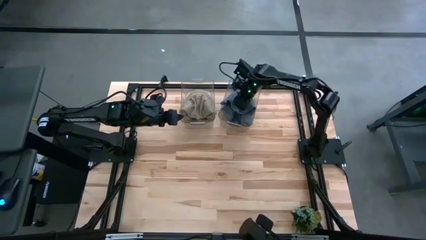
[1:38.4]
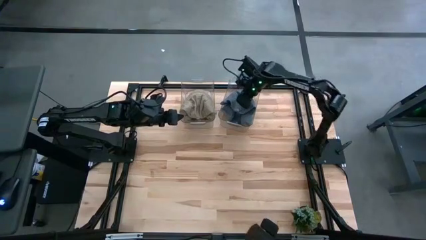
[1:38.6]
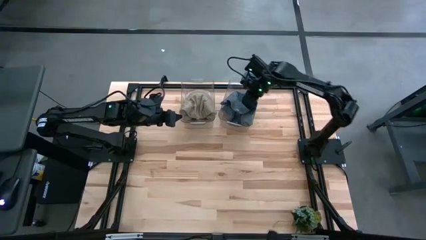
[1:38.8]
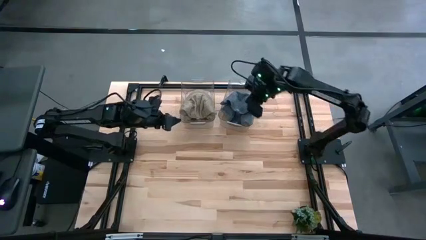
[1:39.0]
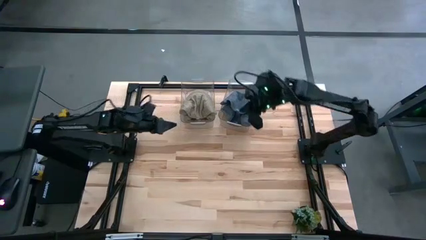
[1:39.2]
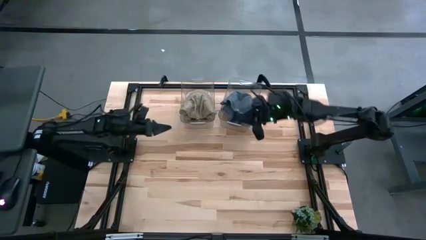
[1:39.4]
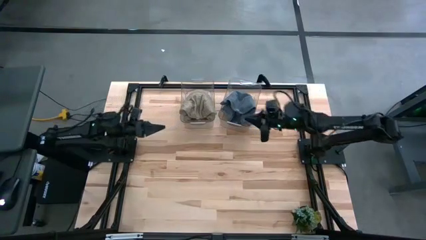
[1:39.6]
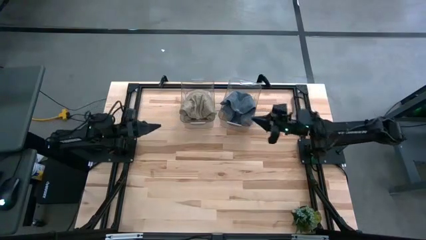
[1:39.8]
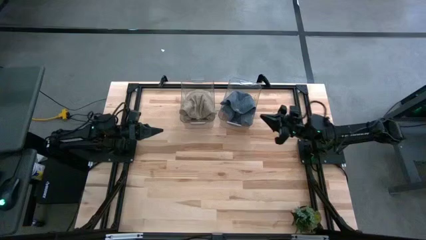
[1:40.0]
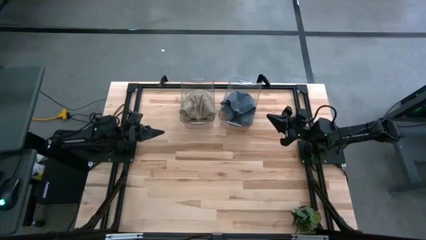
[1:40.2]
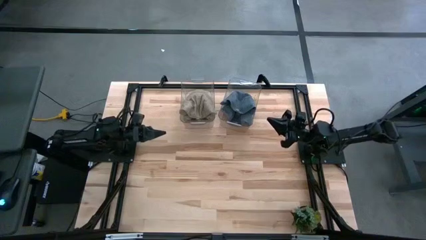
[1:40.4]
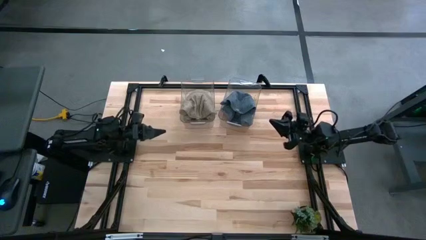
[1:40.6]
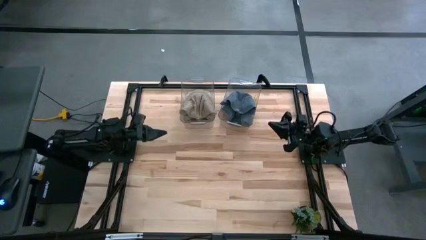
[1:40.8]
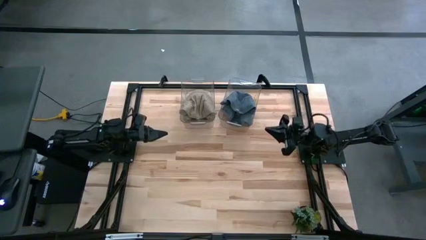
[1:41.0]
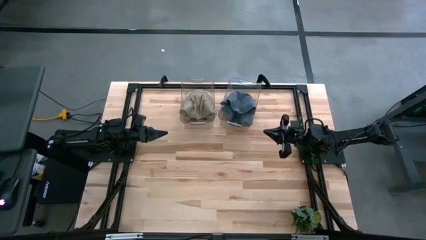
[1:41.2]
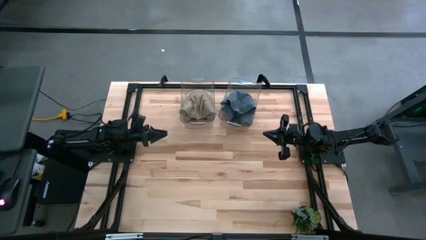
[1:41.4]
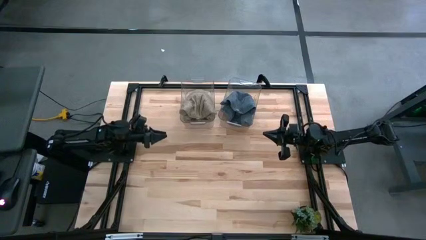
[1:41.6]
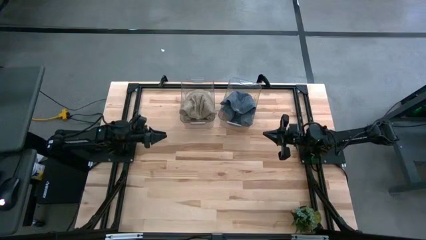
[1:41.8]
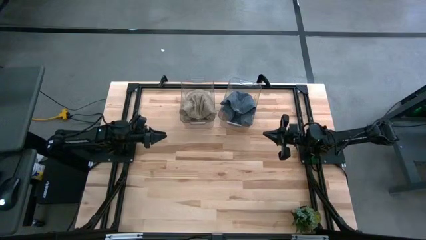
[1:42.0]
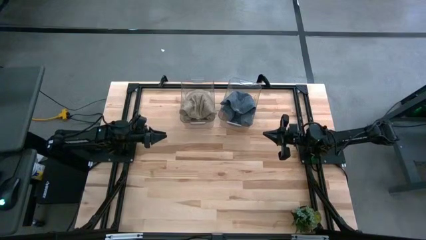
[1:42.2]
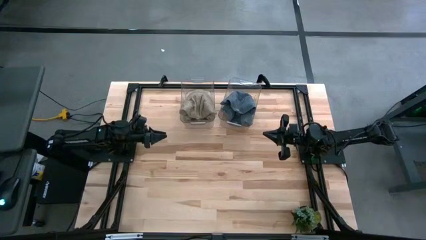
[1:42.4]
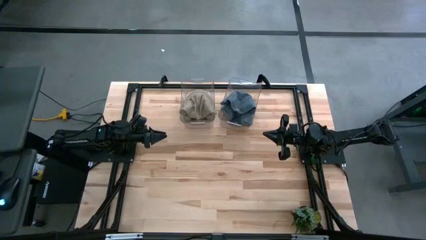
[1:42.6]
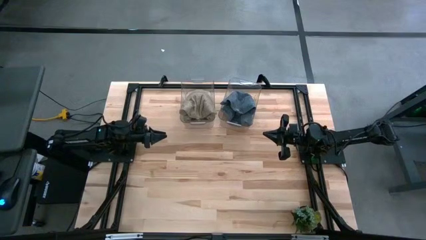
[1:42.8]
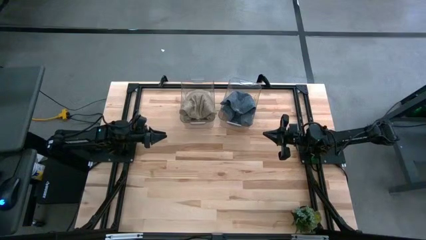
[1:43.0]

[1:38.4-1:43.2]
Task: Pick & Place hat
Return to Home Position

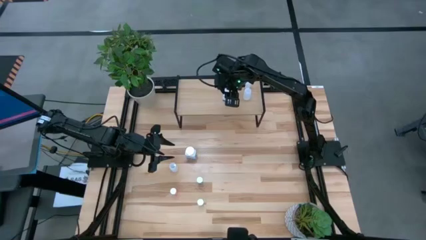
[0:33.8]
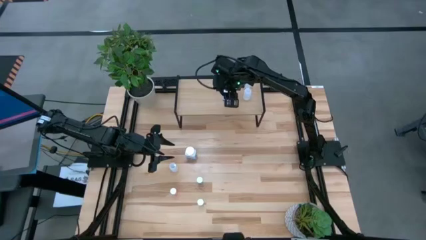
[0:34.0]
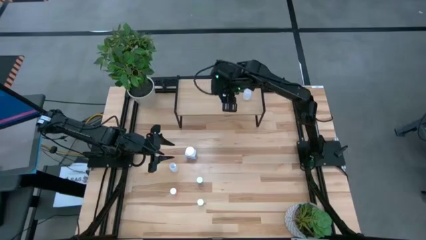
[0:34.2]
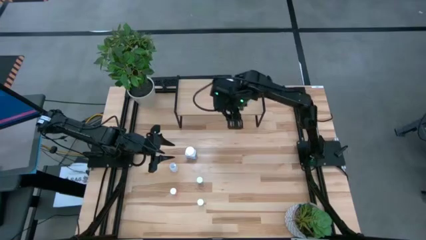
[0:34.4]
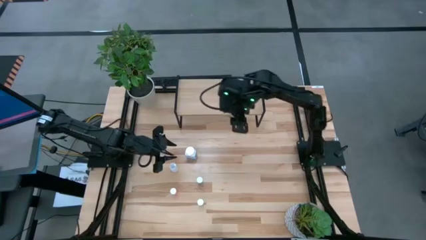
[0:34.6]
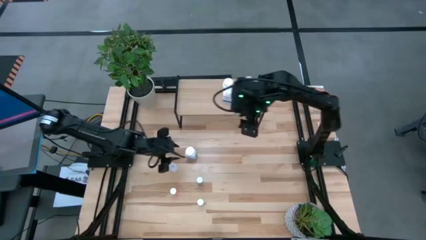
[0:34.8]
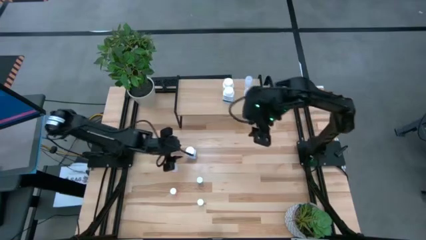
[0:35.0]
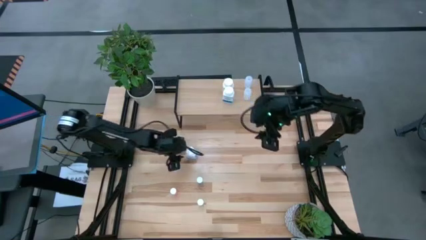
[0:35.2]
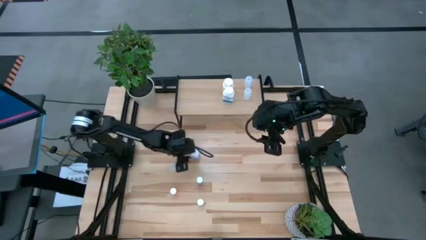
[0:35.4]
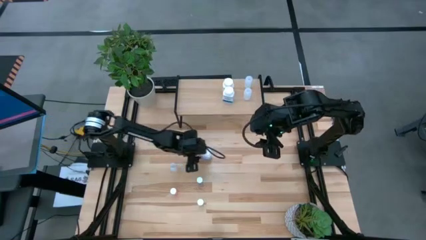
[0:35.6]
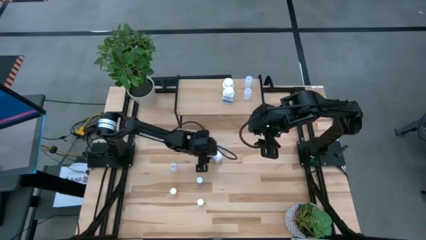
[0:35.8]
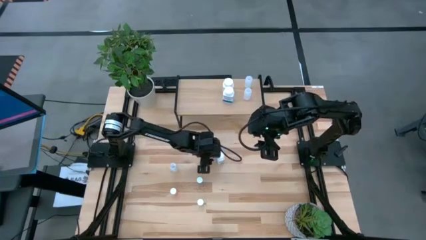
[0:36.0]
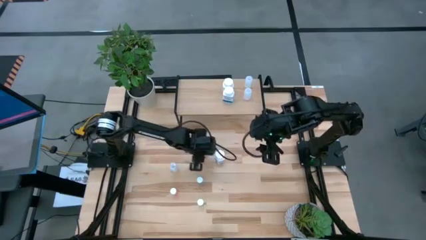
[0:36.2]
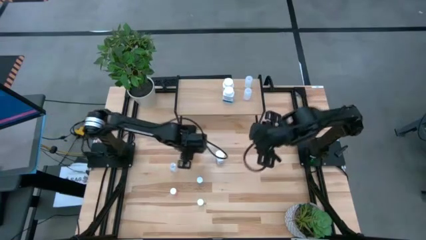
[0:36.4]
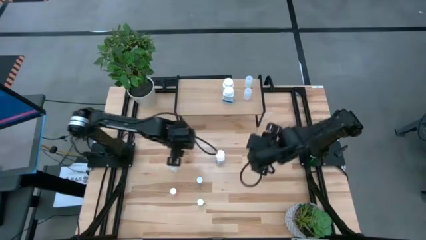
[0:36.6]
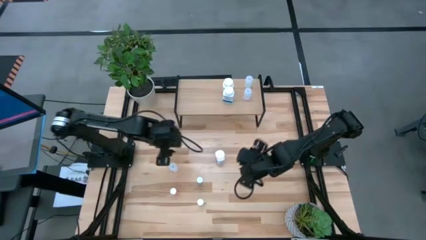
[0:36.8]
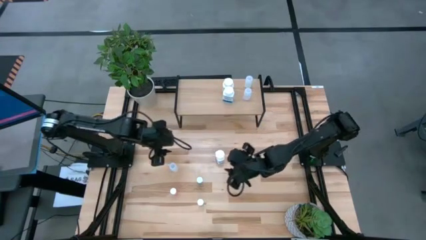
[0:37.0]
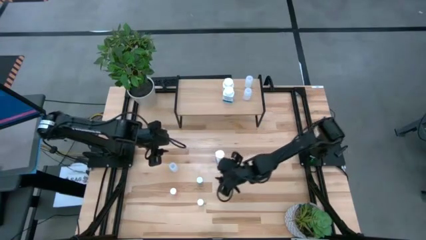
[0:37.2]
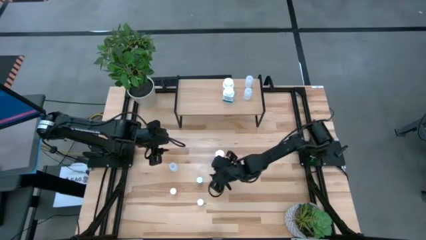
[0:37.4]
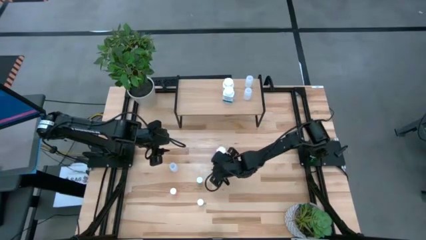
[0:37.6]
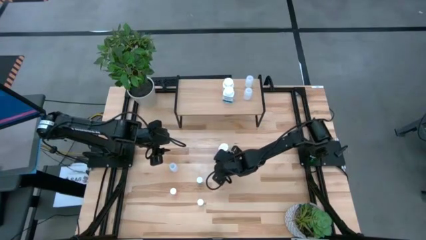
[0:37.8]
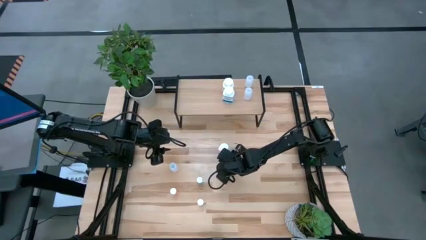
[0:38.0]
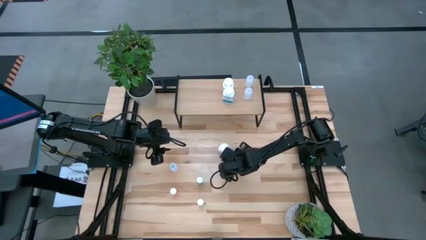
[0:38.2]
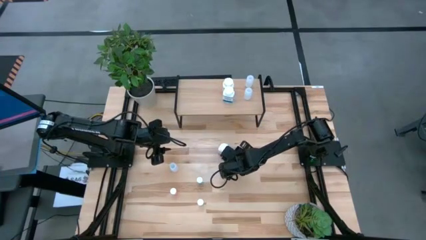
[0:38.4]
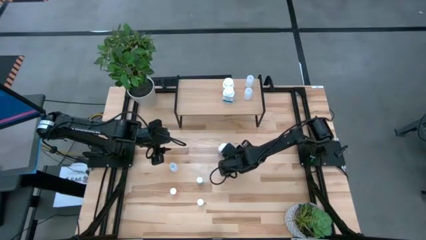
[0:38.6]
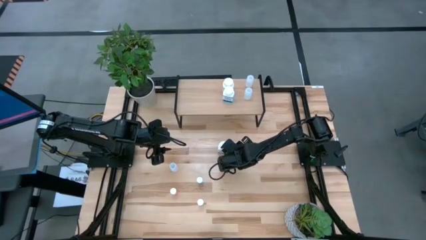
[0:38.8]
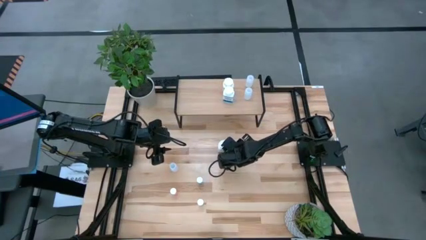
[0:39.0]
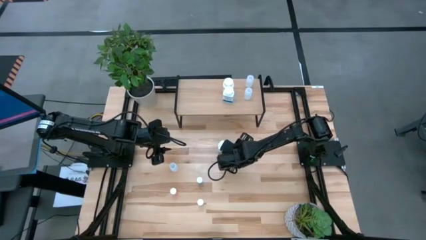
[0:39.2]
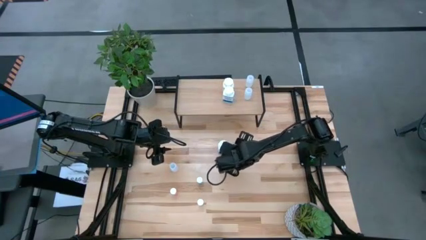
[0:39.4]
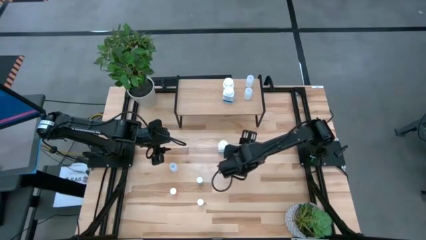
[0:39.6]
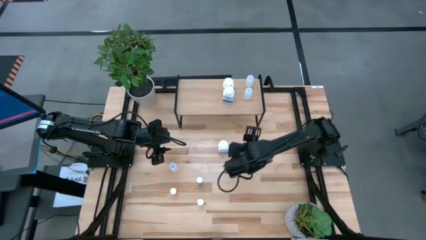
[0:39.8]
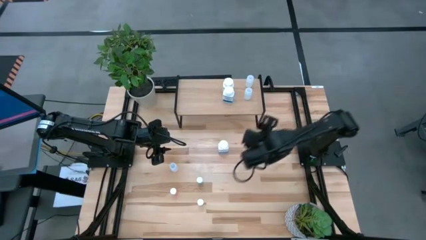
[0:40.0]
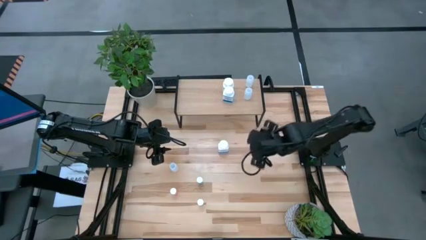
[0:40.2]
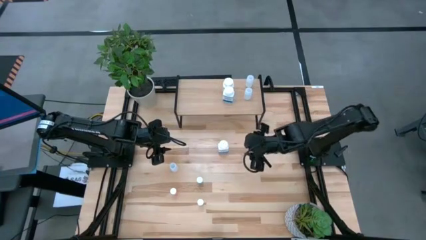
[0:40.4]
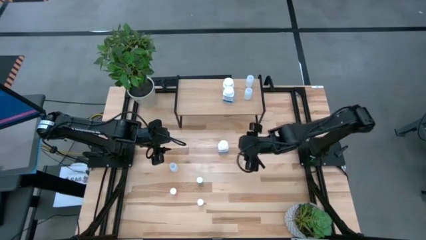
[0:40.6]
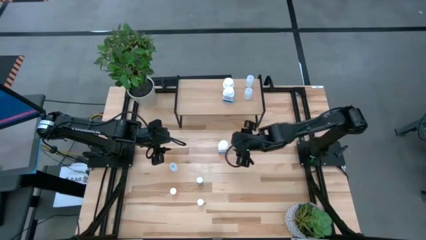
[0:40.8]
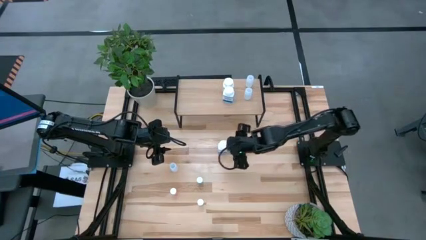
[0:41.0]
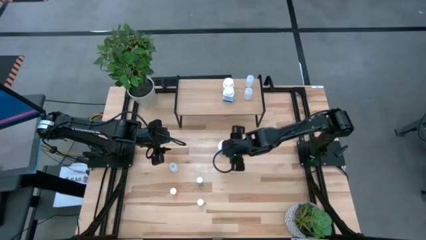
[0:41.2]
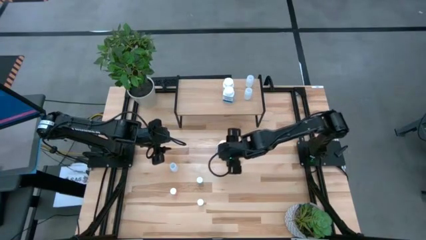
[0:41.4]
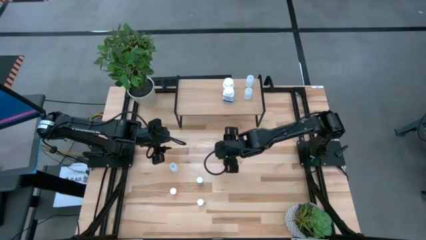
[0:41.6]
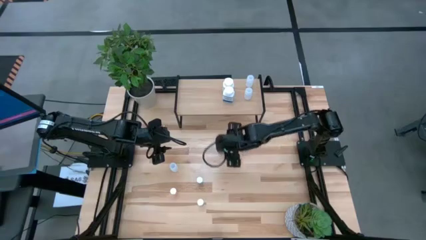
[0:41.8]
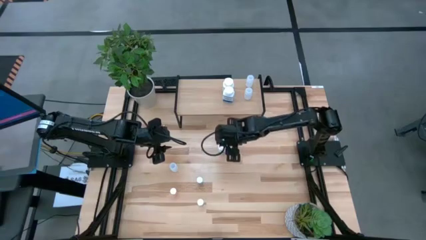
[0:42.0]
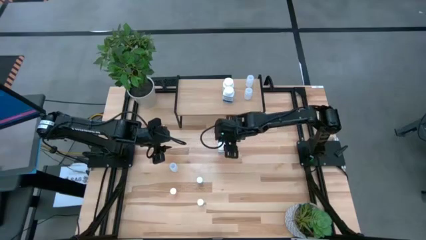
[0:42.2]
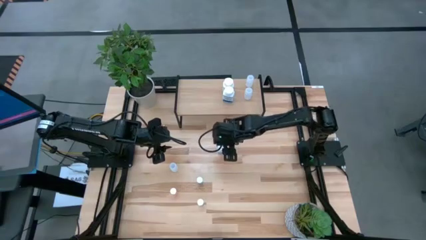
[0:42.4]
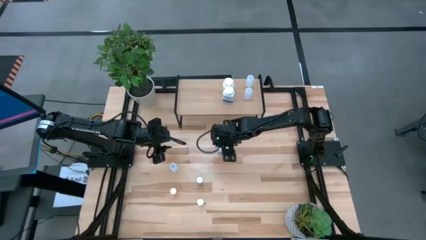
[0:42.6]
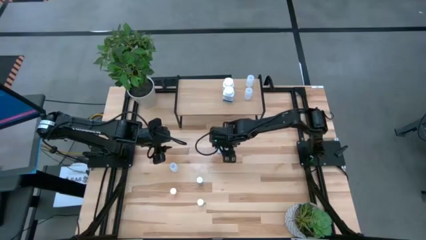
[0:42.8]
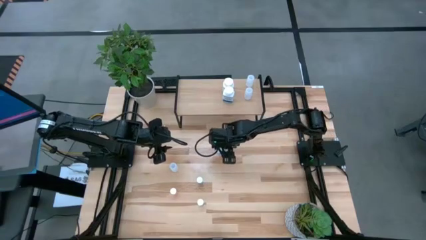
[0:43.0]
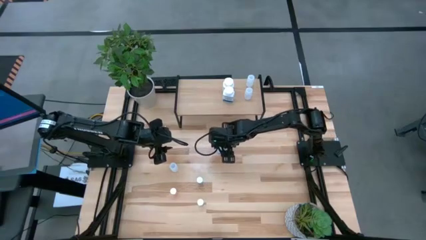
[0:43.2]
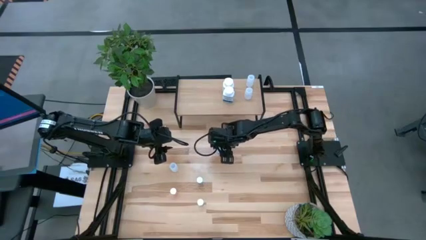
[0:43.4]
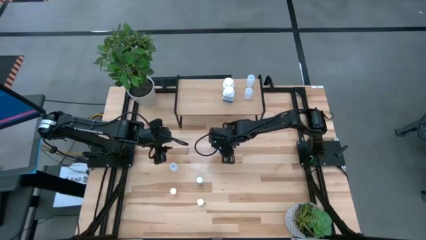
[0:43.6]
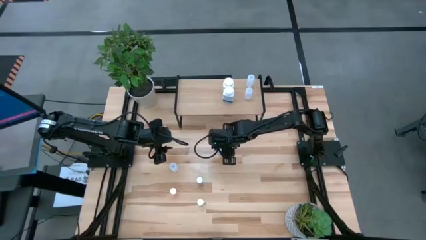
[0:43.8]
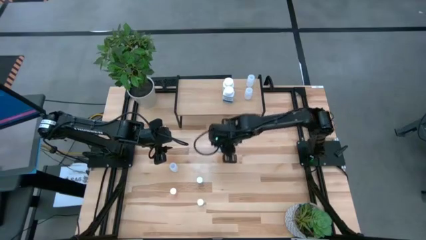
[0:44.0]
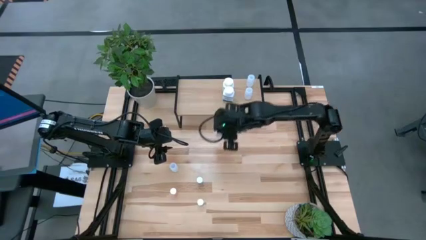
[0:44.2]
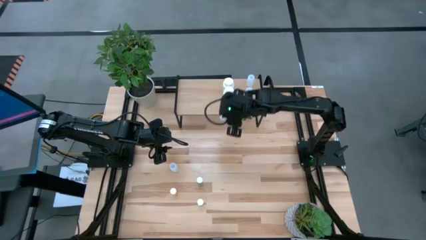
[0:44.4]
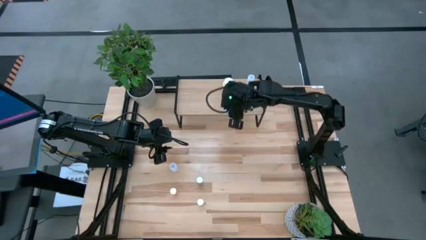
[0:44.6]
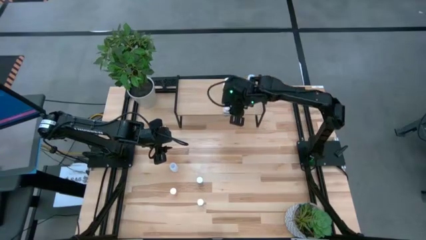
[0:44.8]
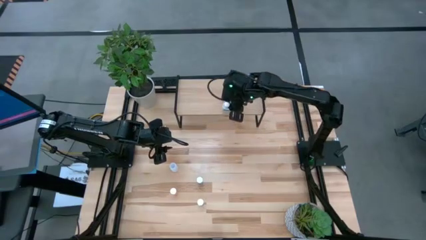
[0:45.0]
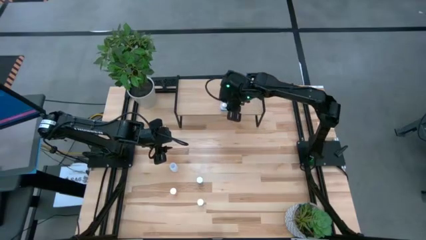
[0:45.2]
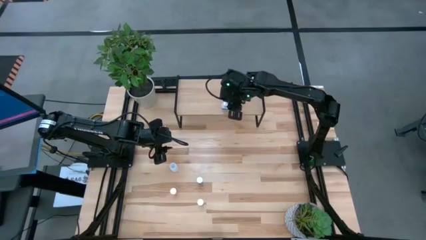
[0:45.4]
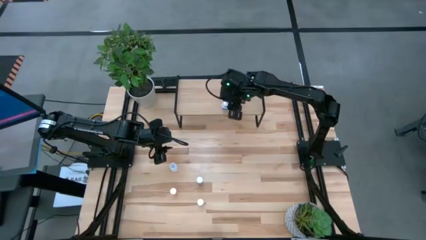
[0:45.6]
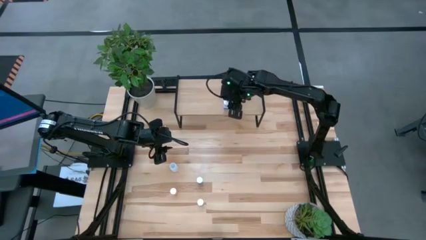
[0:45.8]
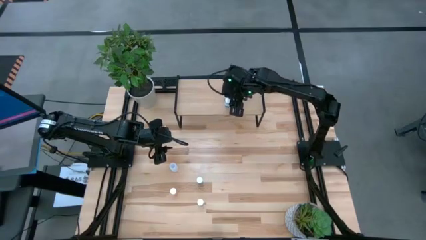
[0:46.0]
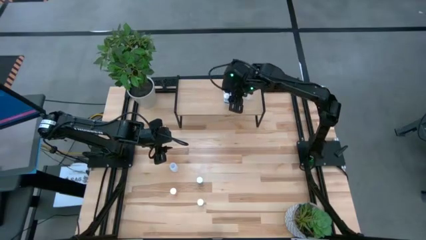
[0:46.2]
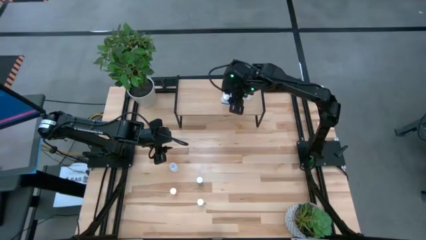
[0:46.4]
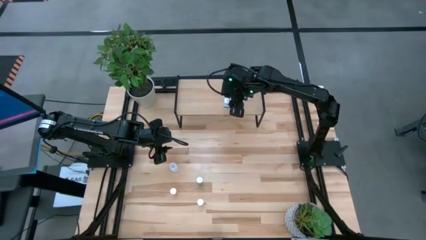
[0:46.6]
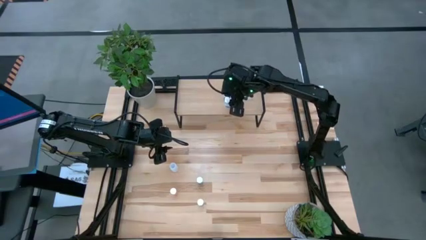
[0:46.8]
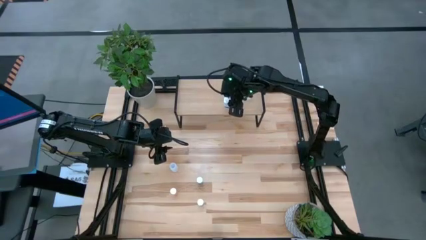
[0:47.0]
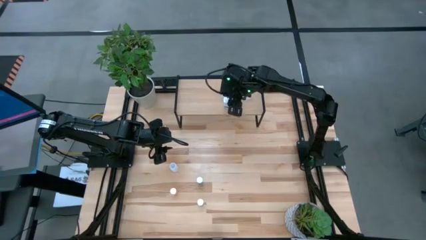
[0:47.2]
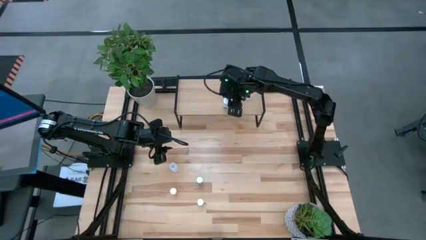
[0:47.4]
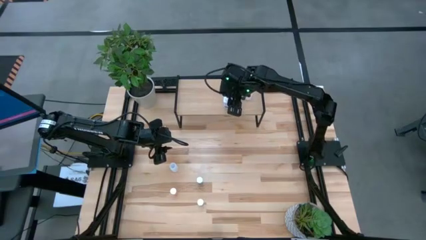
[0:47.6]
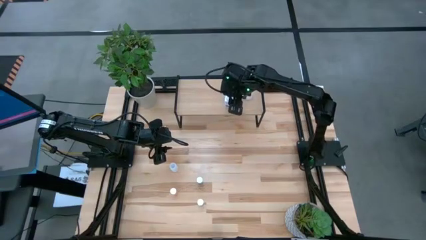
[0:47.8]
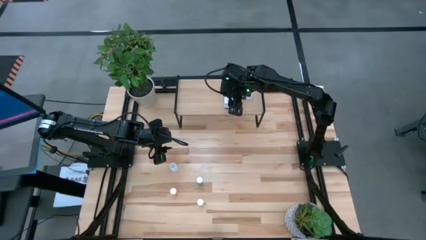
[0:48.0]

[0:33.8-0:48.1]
Task: Pick and place medicine bottles onto shelf by color
Align the white and blue bottle with the other white and blue bottles on the shelf
